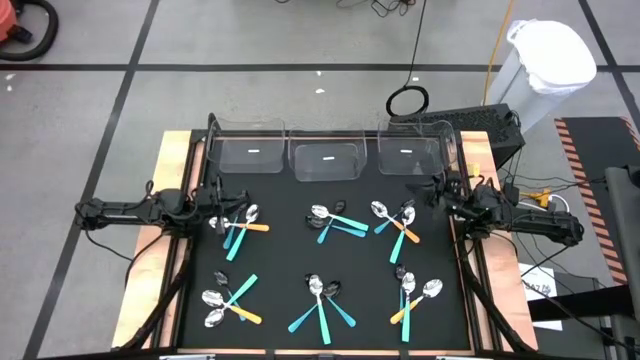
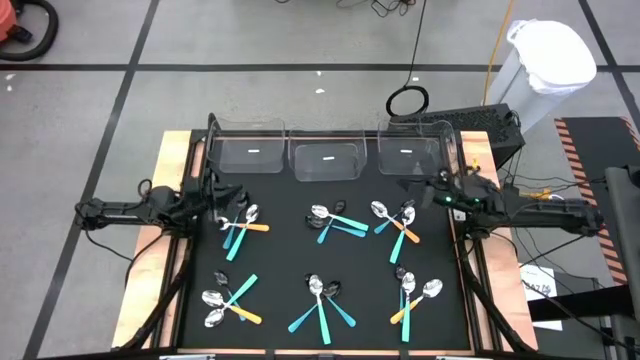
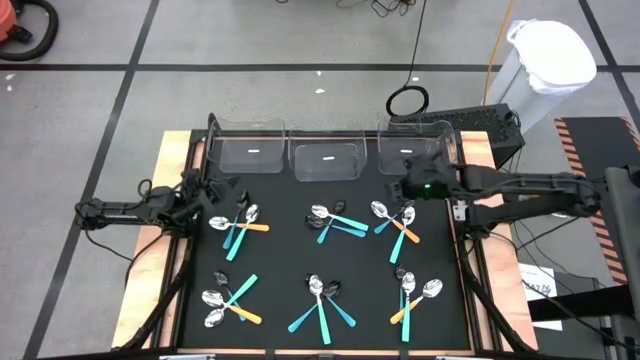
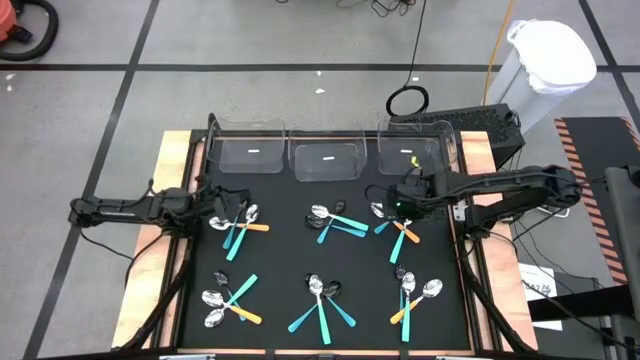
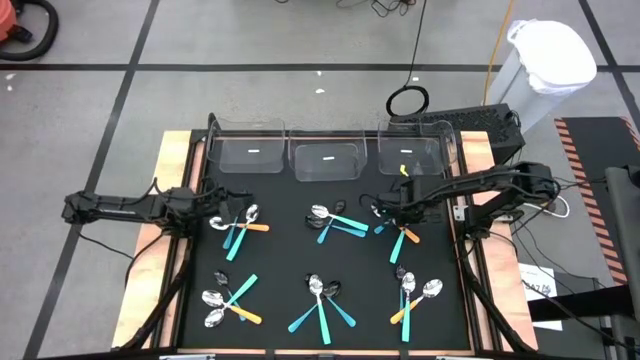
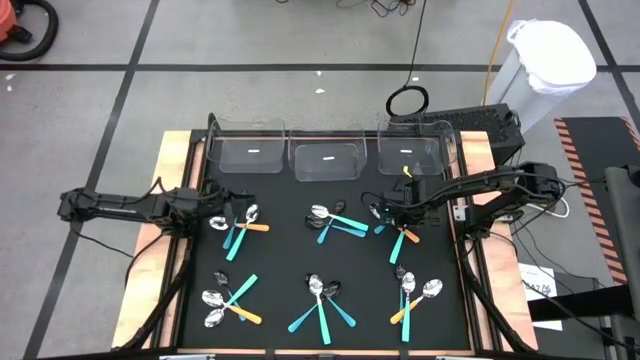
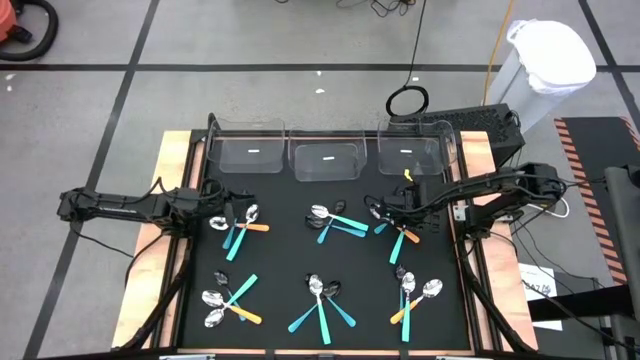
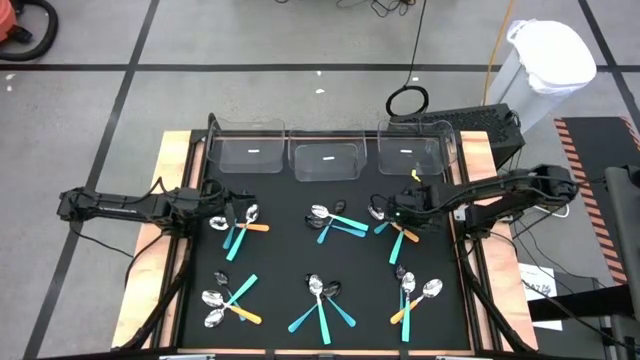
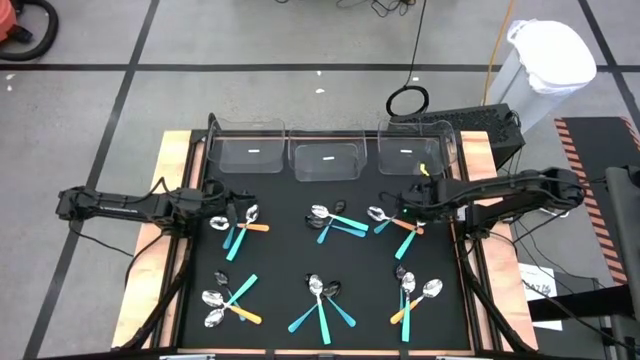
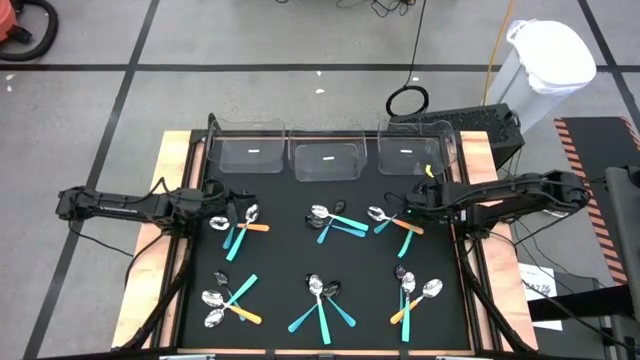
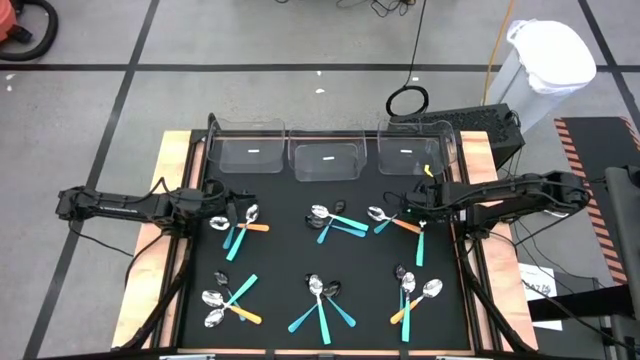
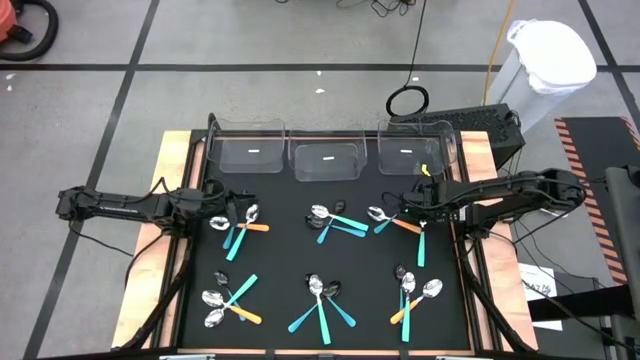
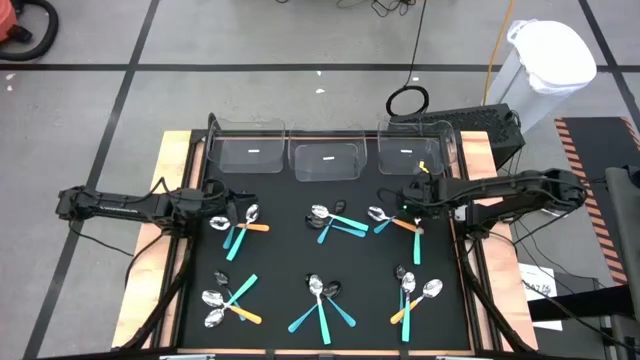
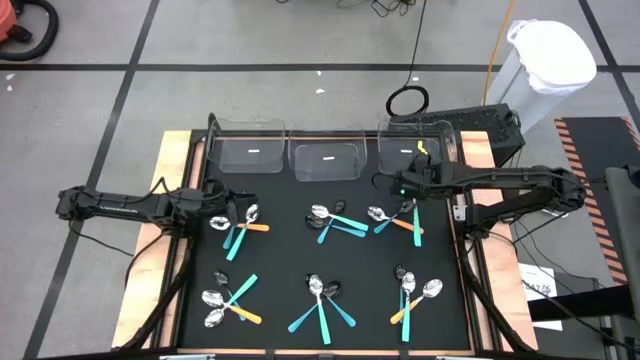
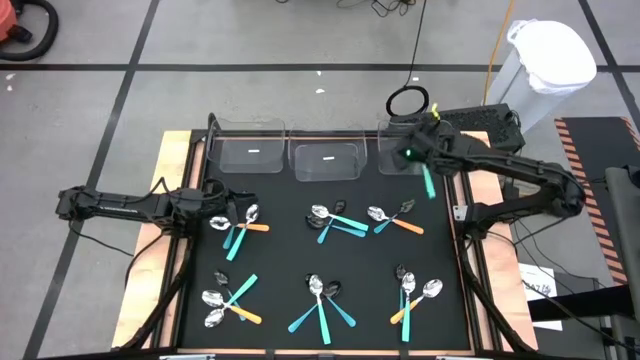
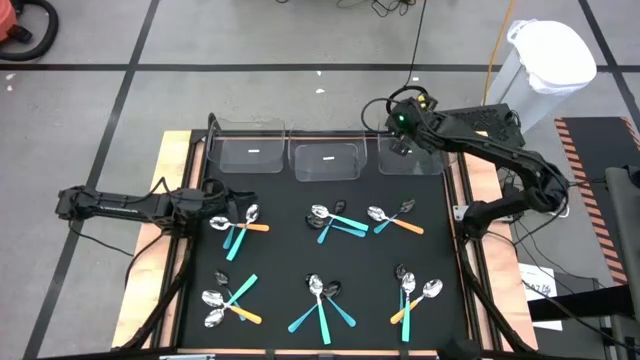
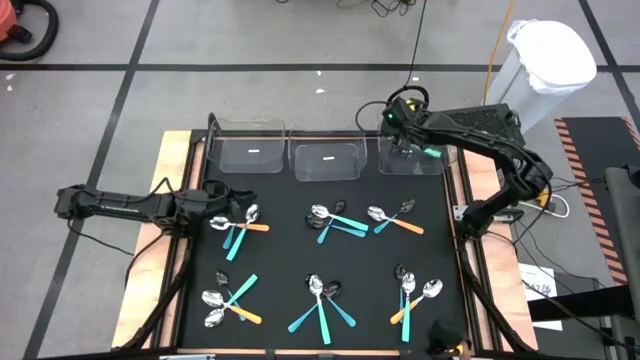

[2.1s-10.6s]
Task: Sort silverware by color (type)
Put the light green spoon into the right transparent bin

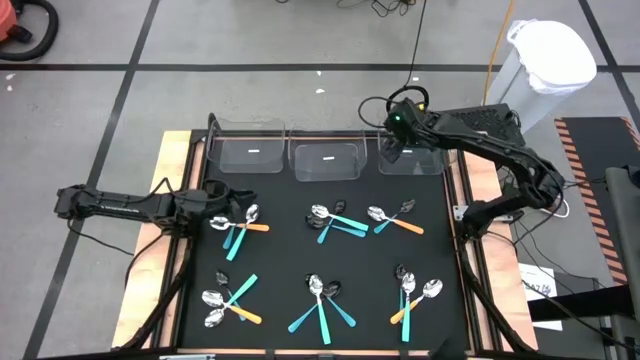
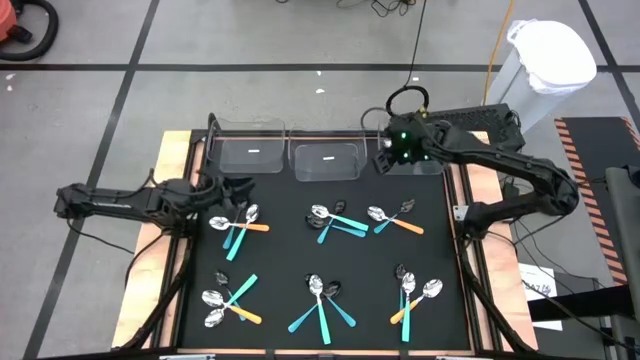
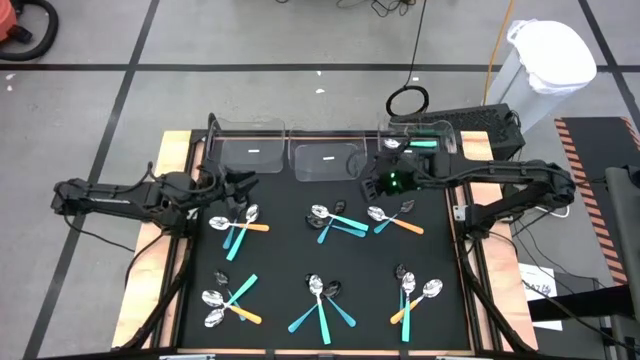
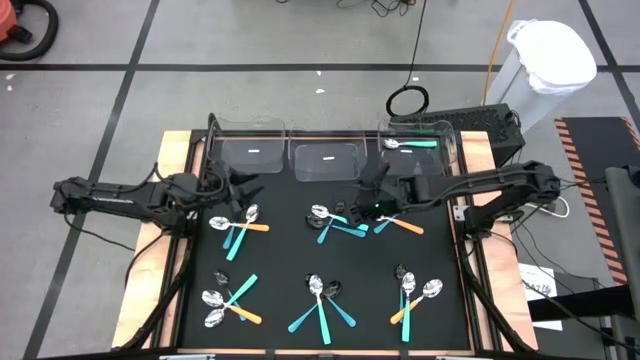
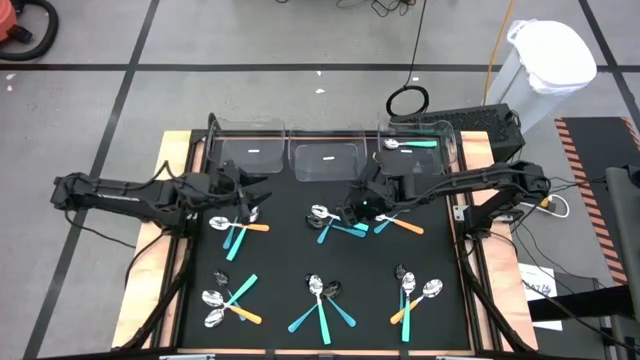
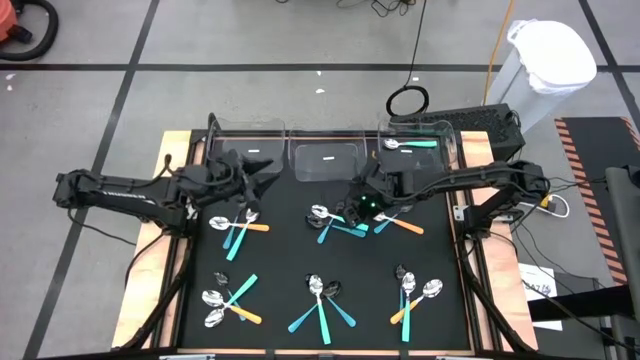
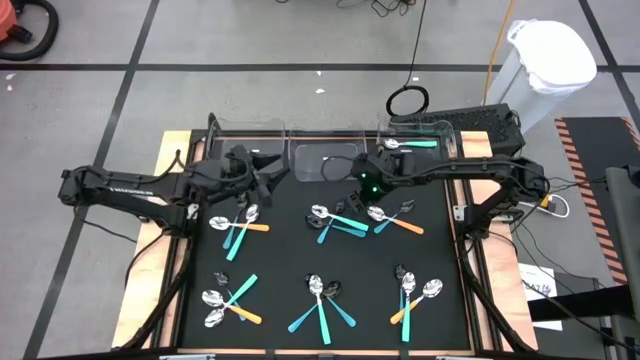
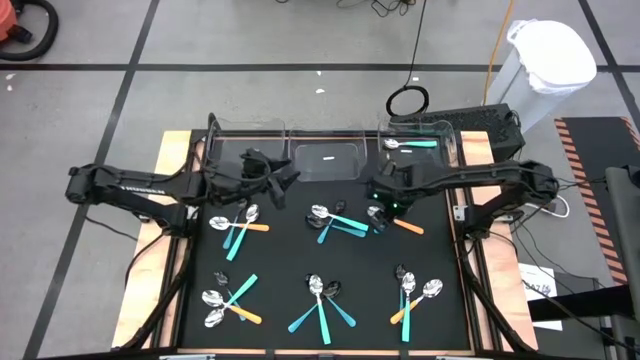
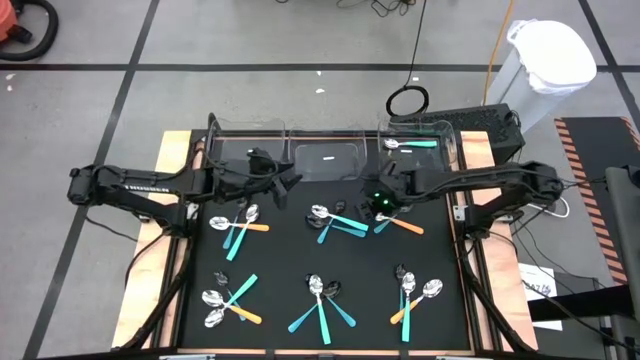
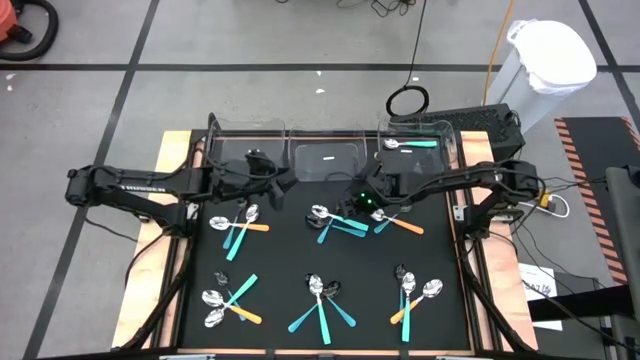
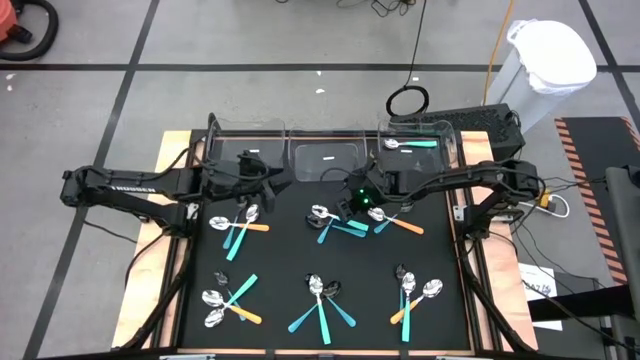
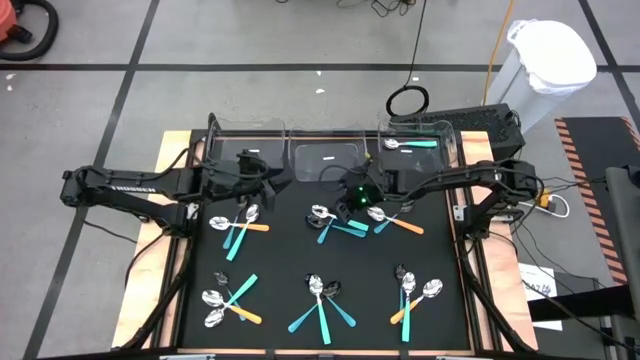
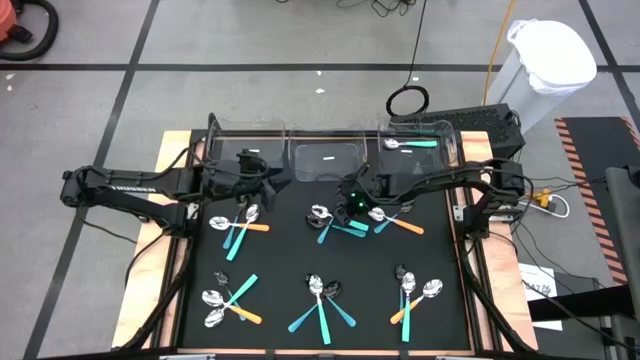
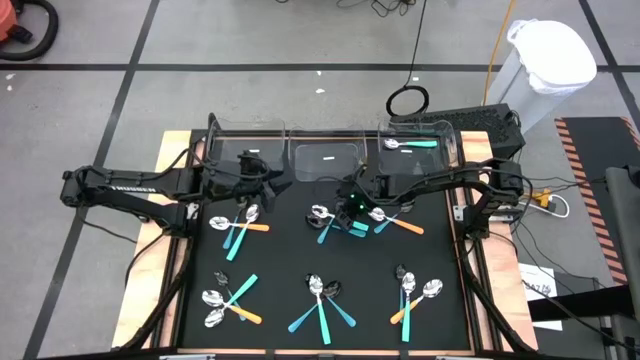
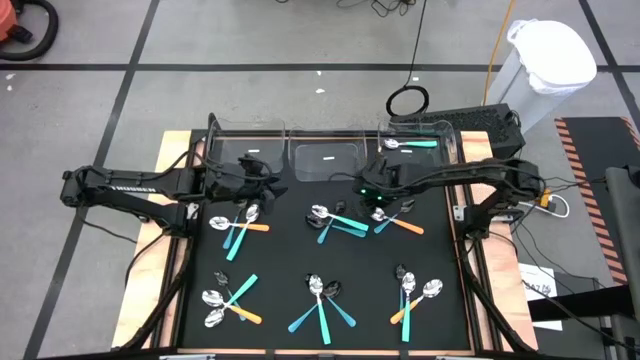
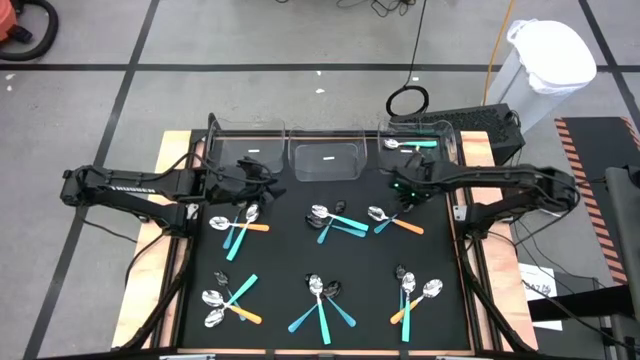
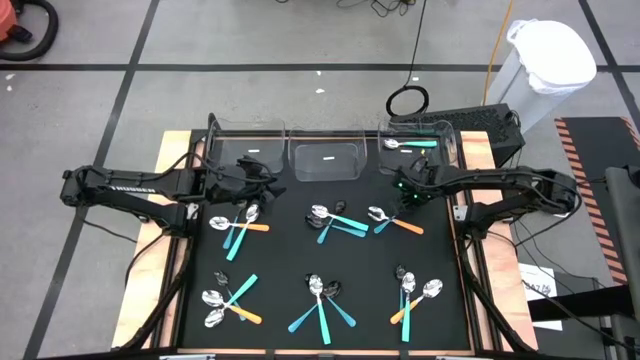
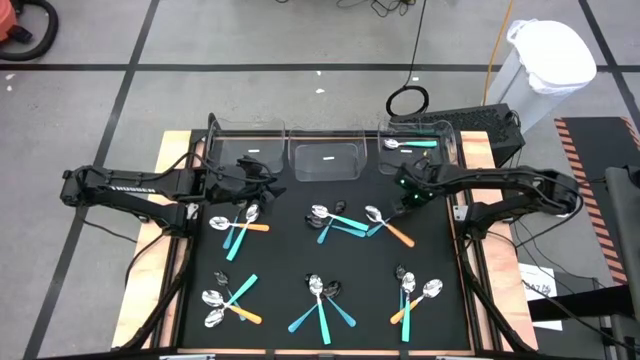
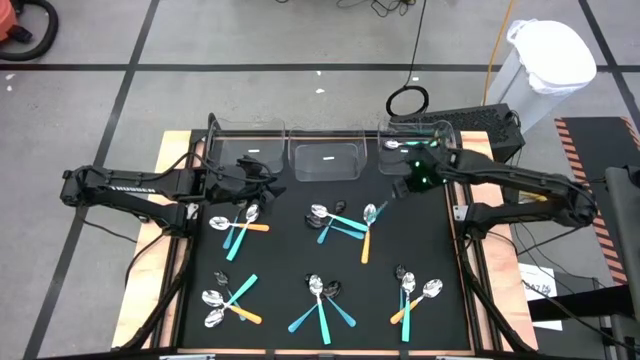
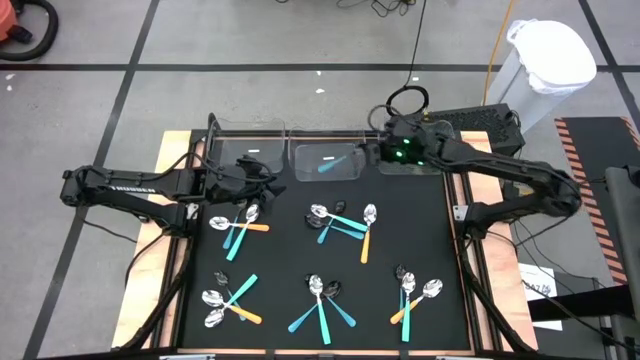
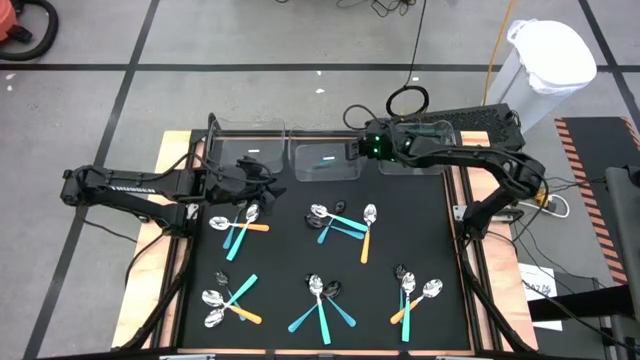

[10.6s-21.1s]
Put the light blue spoon into the middle transparent bin
